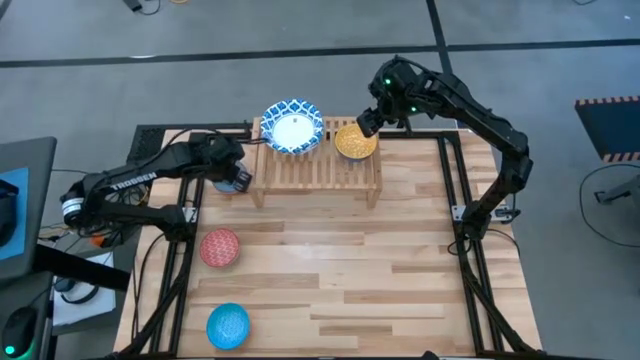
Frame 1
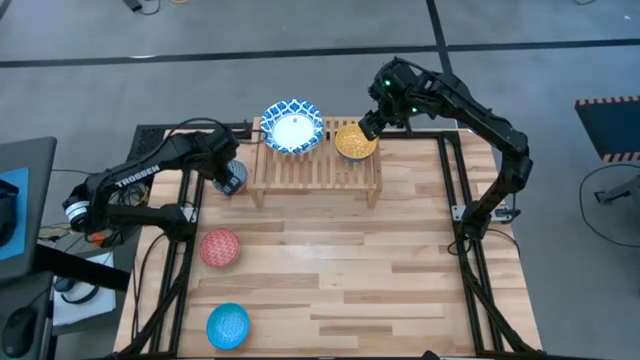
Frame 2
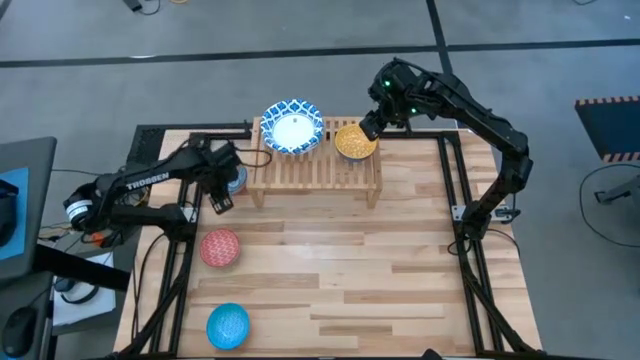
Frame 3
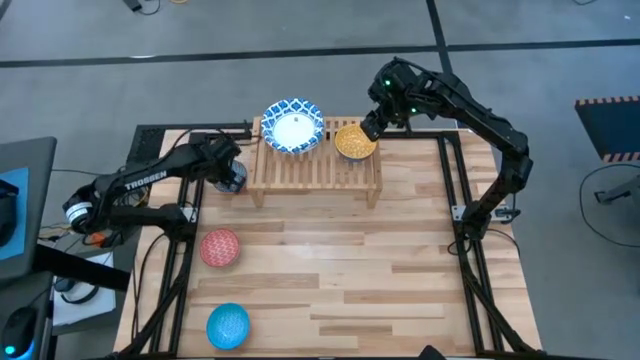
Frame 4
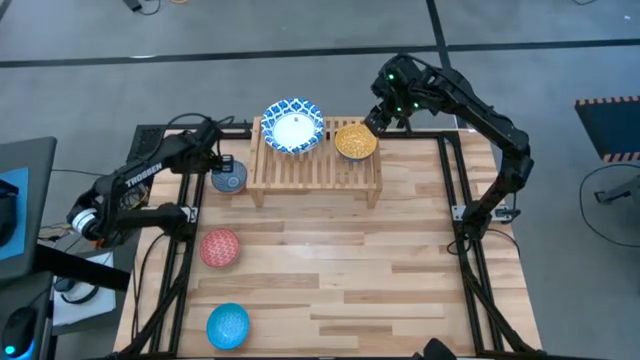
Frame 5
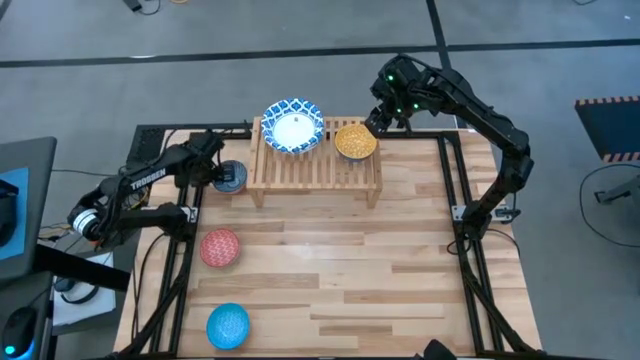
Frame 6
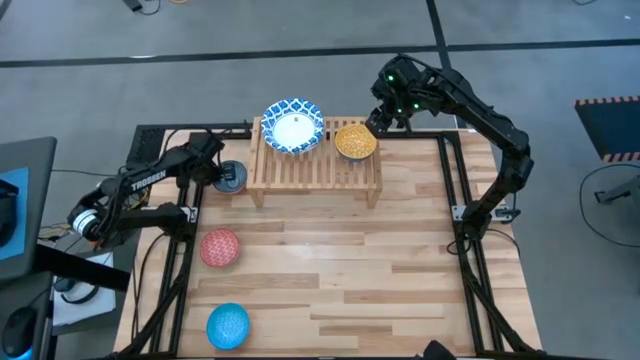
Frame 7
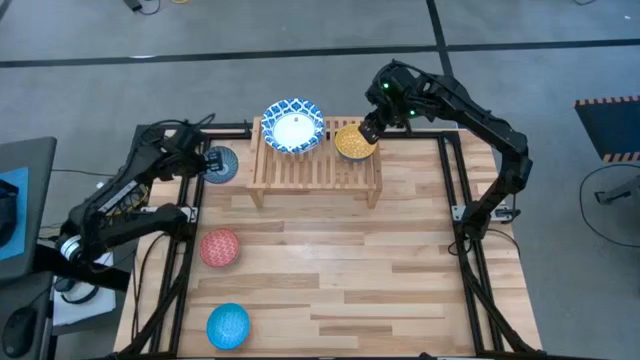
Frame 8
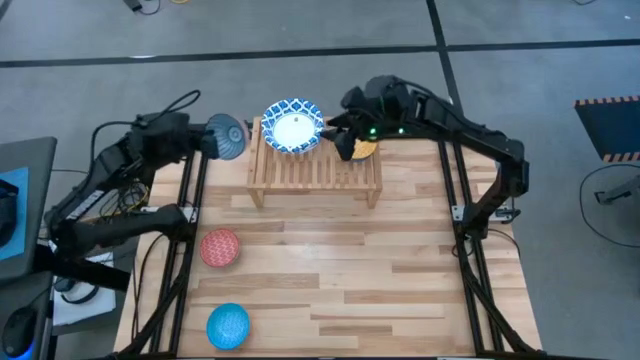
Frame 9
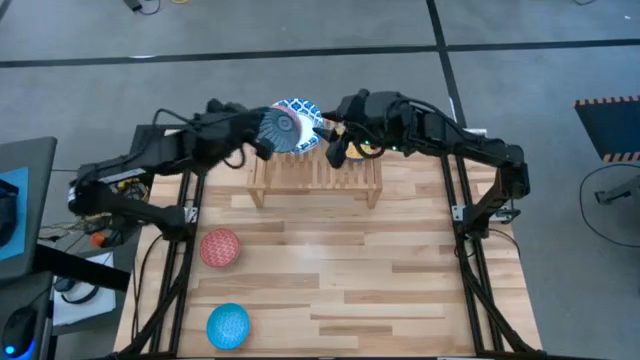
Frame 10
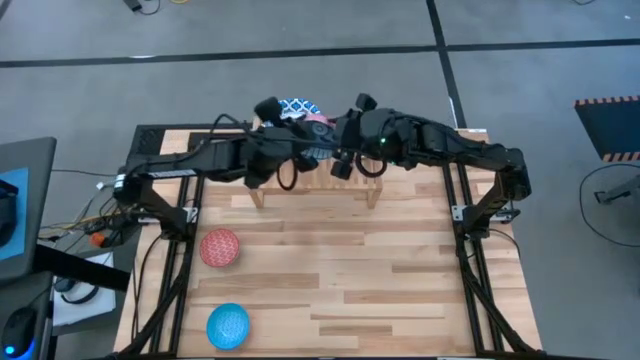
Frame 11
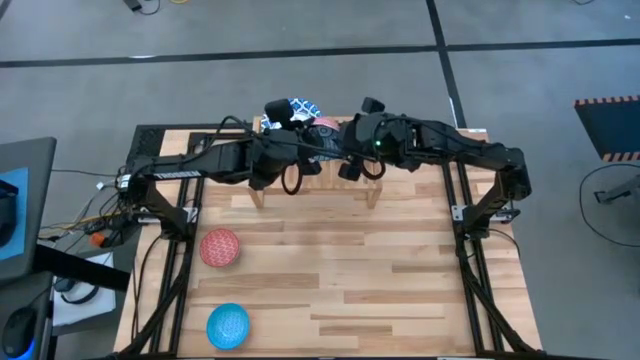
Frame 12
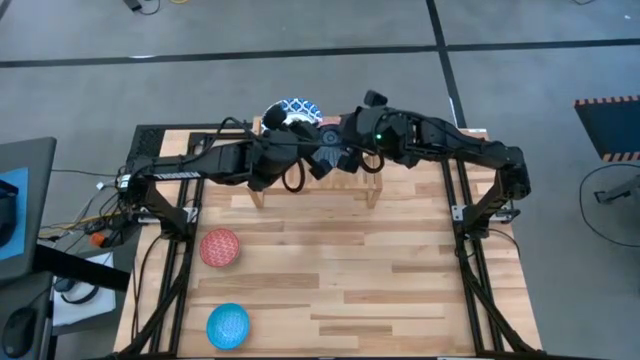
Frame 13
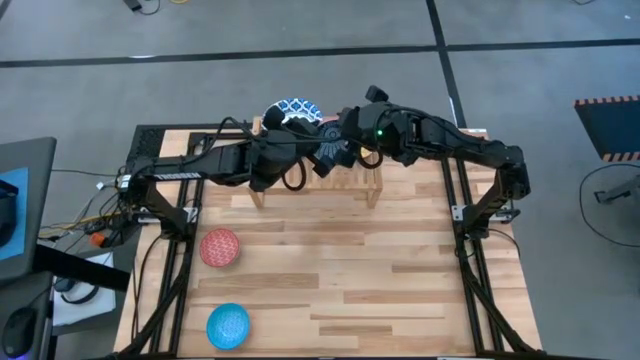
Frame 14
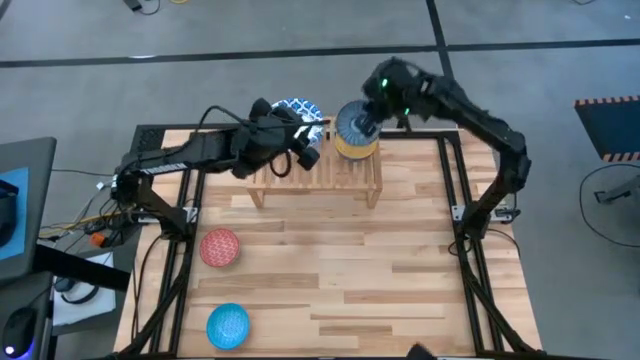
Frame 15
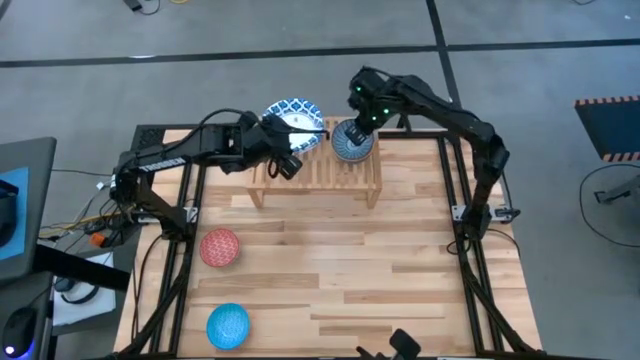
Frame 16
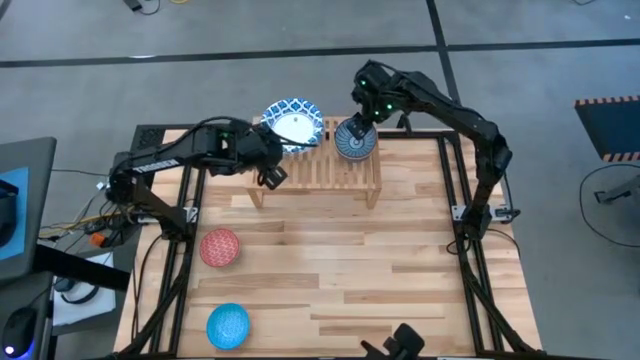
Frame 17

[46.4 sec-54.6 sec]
Task: Place and stack bowls onto a shelf
Stack the dark blue bowl on top of the yellow bowl on the shelf

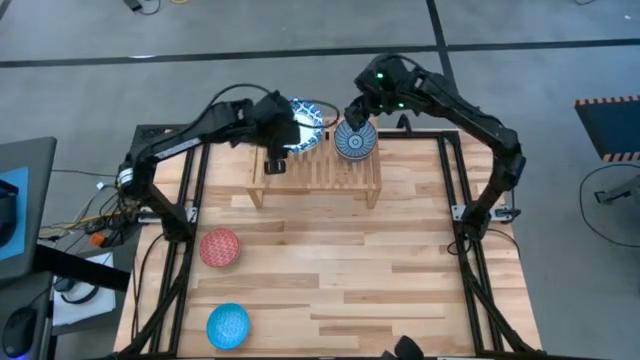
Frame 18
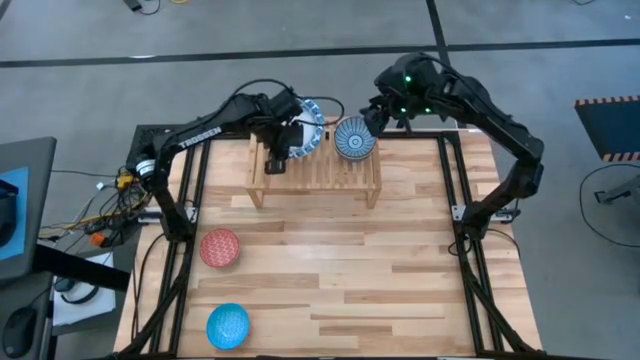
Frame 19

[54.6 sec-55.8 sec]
Adjust the stack of white bowls on the shelf

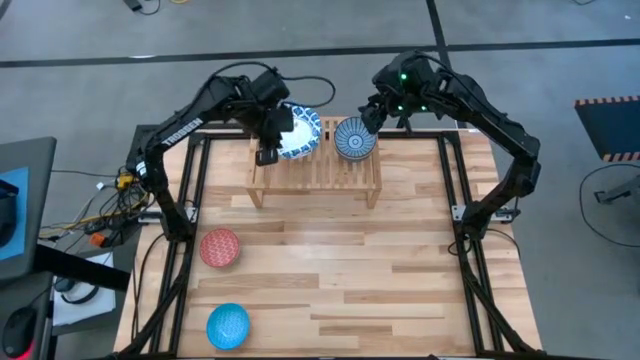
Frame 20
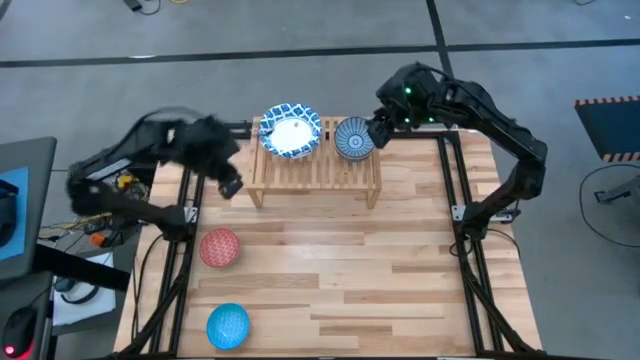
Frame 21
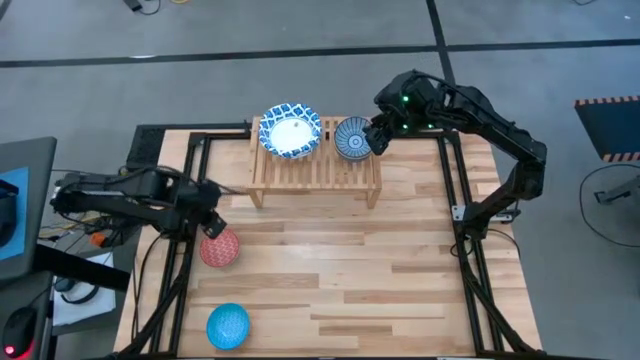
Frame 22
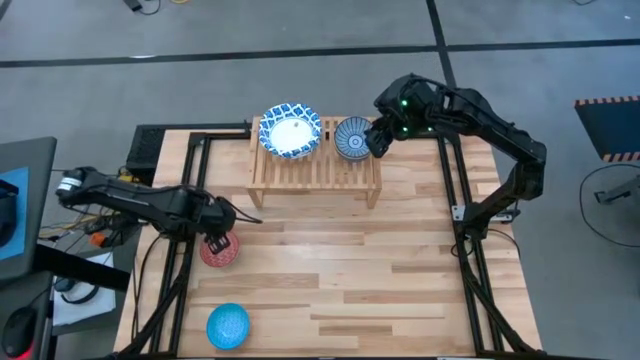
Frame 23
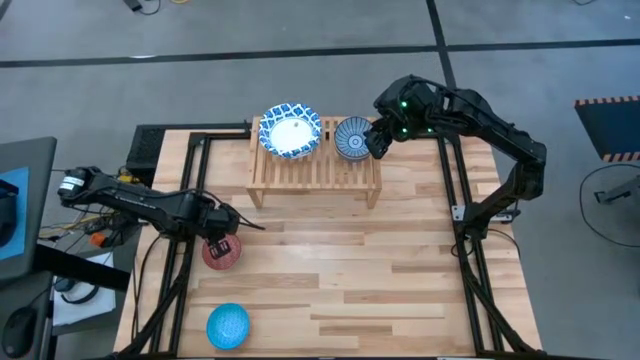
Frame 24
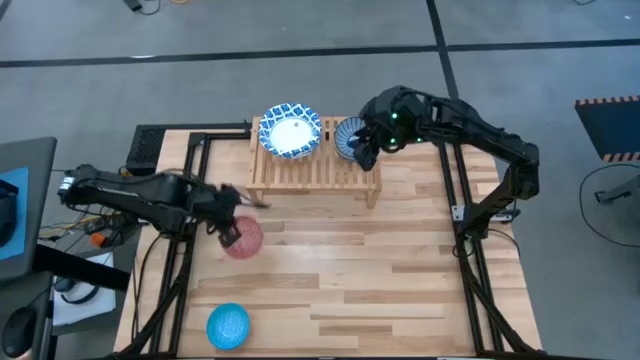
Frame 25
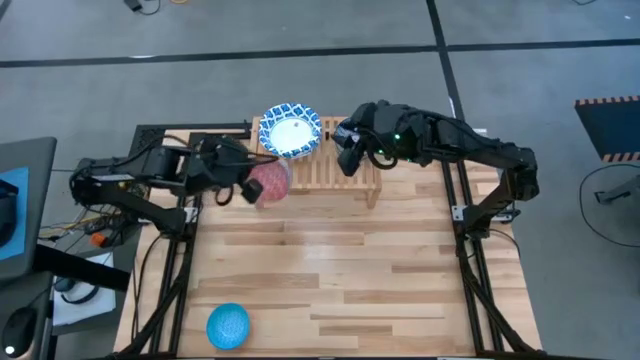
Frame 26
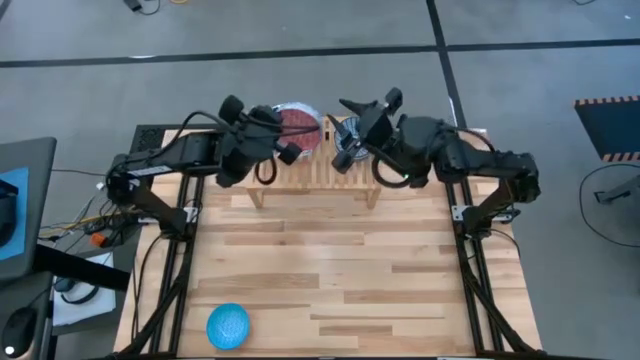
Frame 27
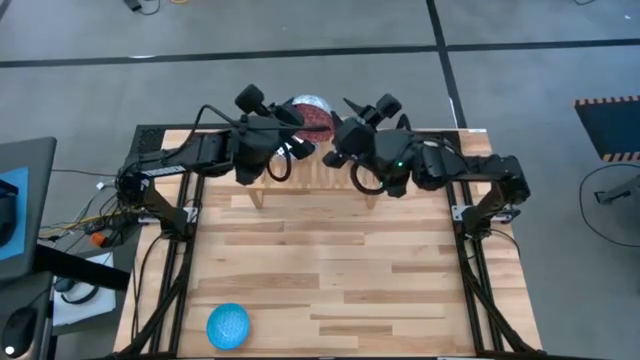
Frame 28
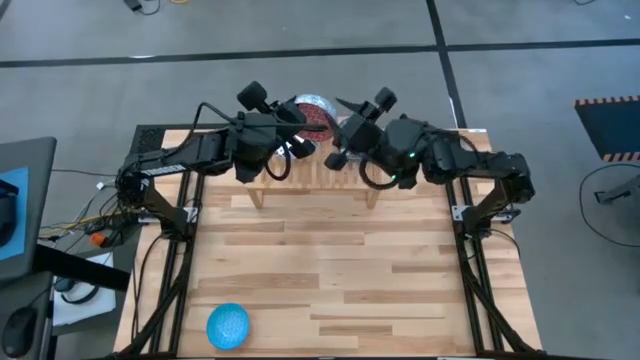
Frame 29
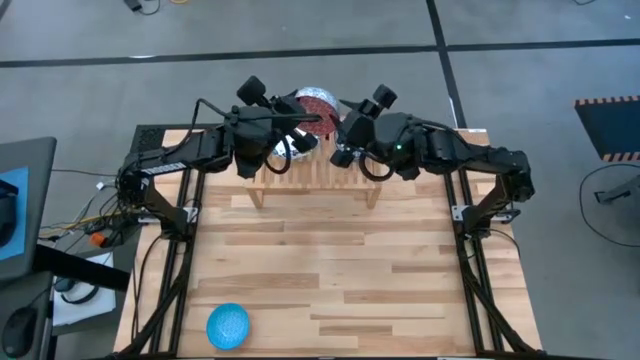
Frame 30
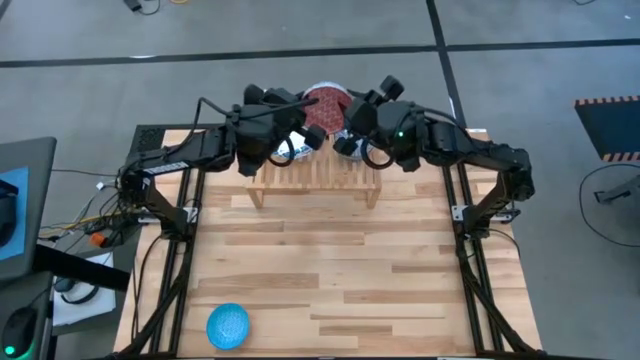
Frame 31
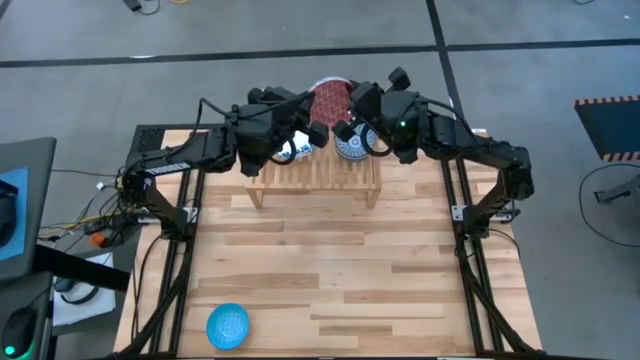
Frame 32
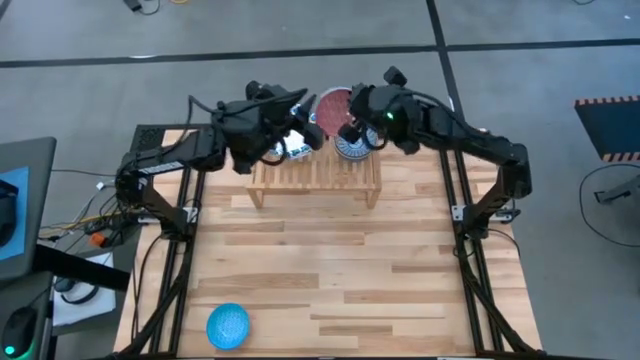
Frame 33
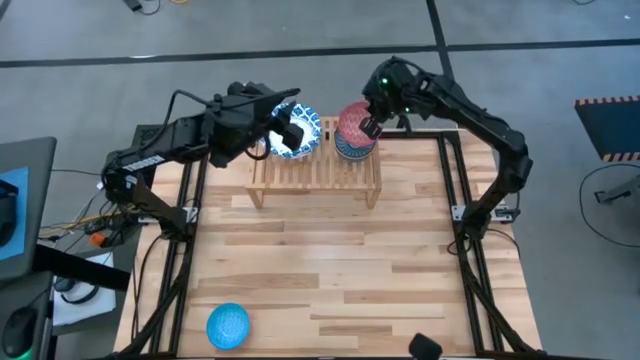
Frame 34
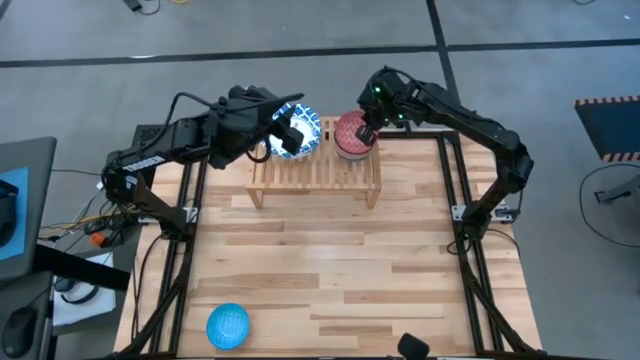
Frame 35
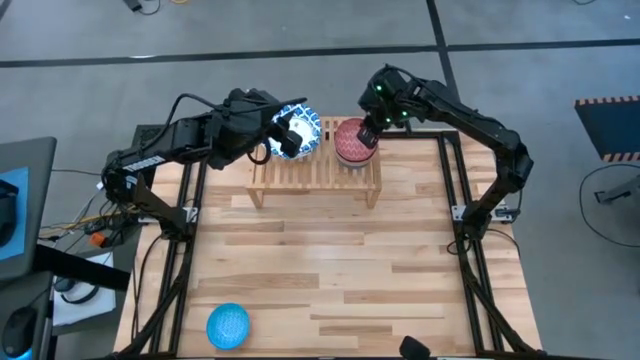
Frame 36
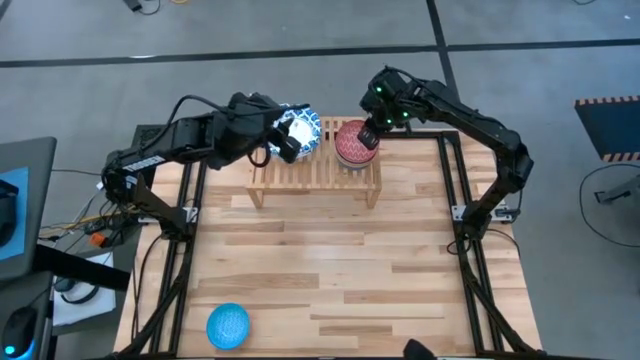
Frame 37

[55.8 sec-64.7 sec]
Stack the red bowl on top of the dark blue bowl on the shelf
